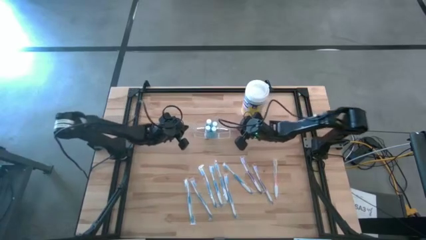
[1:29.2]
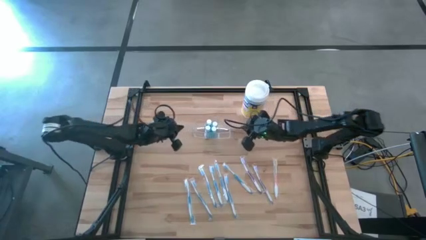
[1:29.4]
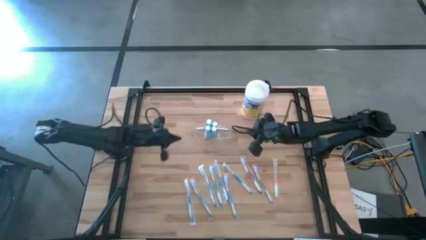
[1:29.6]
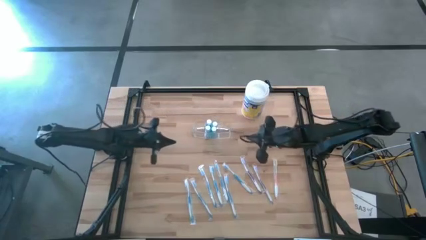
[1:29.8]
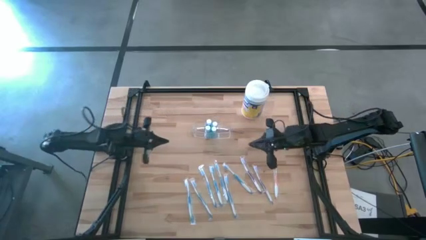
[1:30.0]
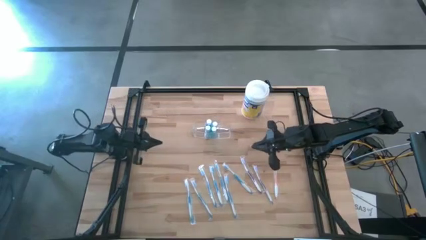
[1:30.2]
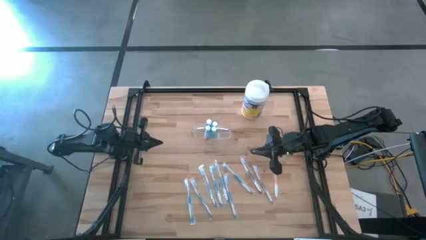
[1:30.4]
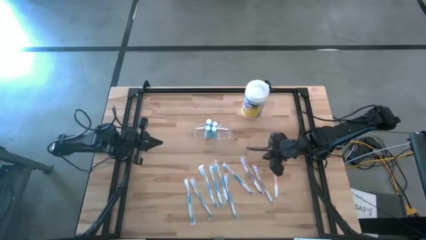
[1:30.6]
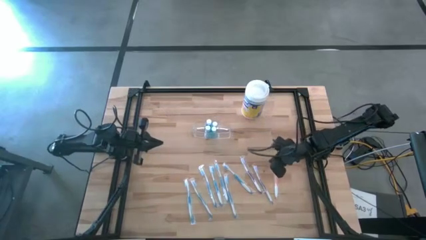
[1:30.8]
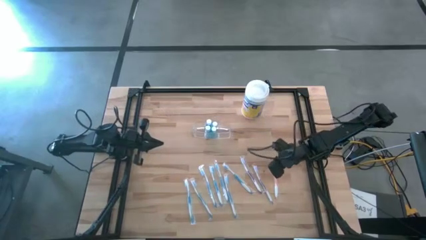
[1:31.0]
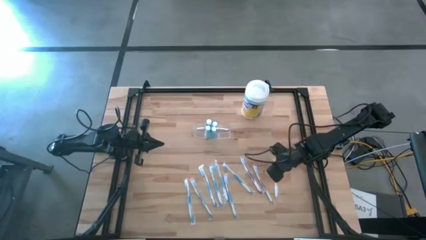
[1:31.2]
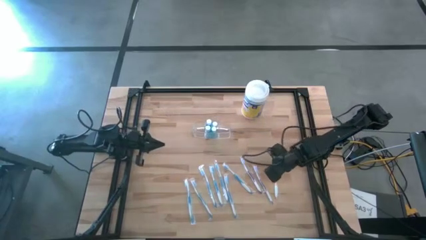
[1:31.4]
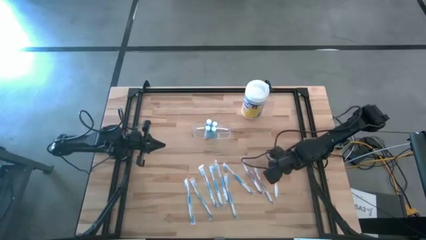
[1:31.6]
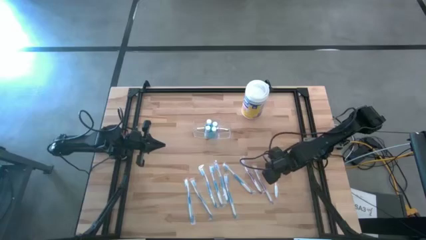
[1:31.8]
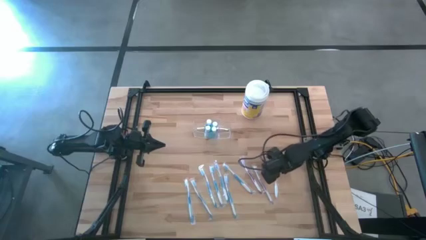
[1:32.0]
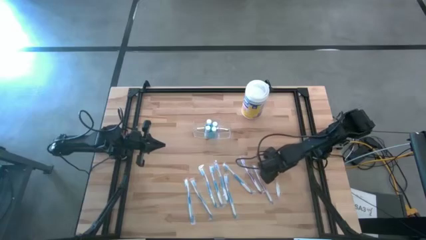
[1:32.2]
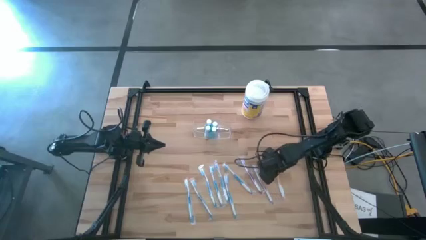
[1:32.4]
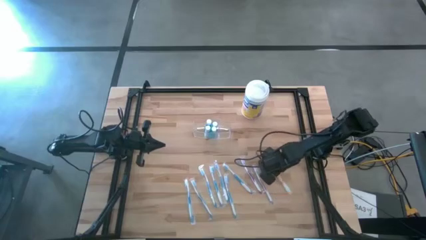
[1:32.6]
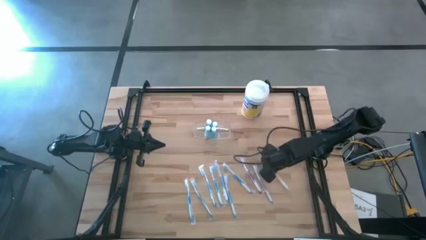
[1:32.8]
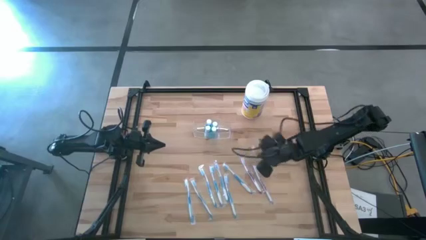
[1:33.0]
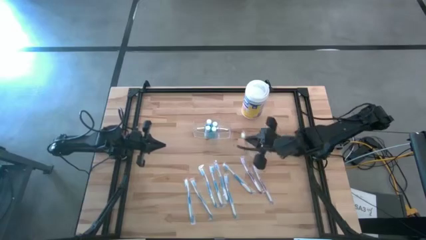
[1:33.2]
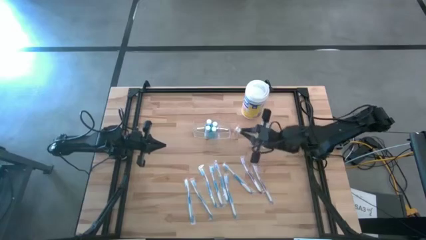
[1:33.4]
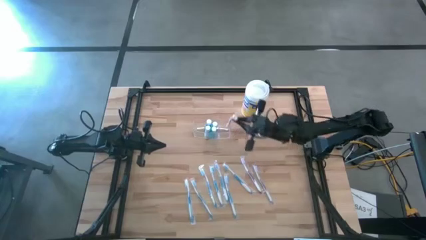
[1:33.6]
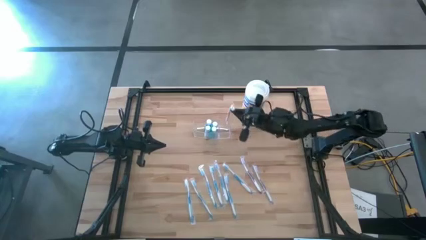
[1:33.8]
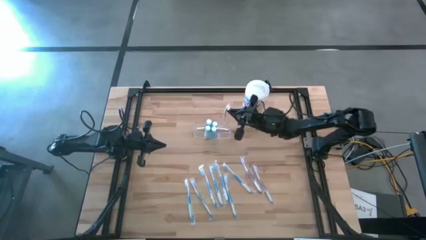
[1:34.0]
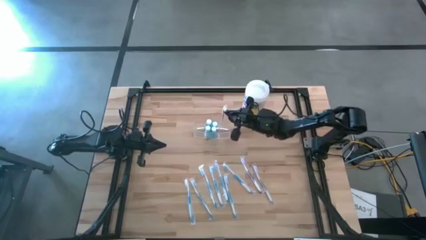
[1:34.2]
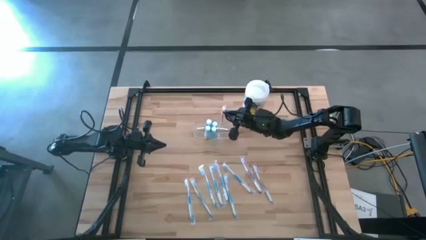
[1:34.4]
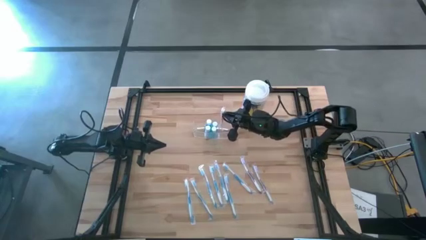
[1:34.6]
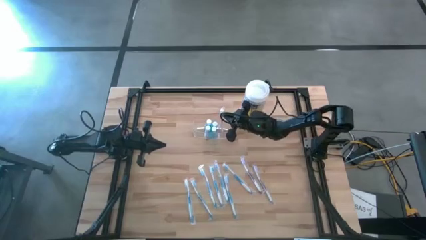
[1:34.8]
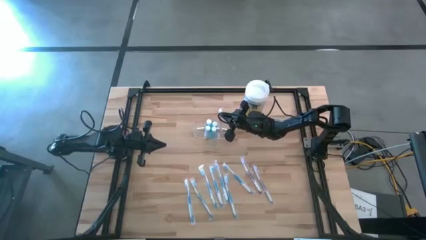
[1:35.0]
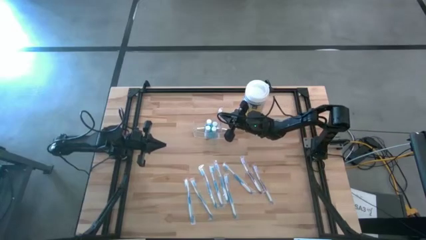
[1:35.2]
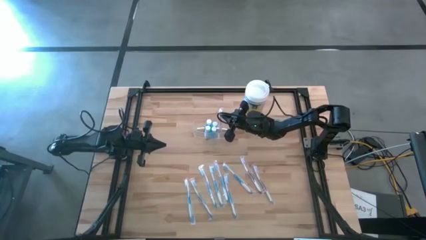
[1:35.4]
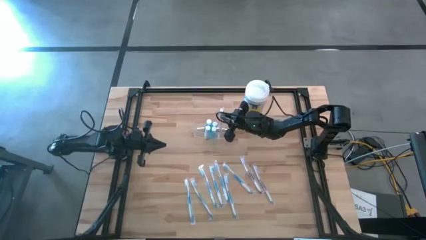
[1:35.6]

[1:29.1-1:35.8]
Task: Pick & Place toothbrushing station
Put the orange toothbrush into the transparent organizer

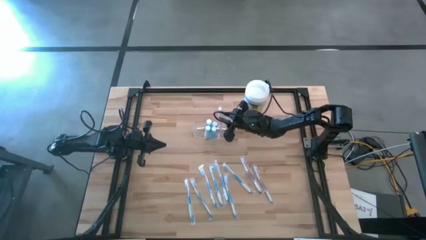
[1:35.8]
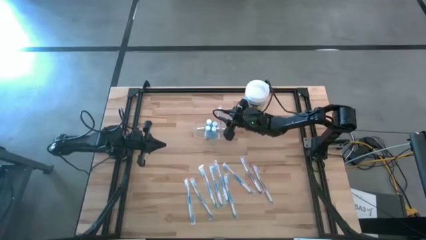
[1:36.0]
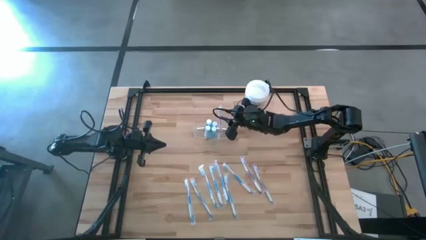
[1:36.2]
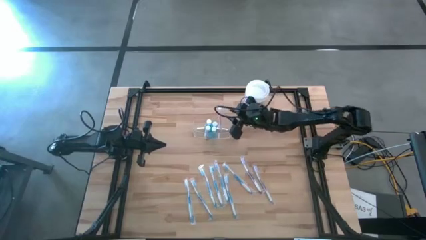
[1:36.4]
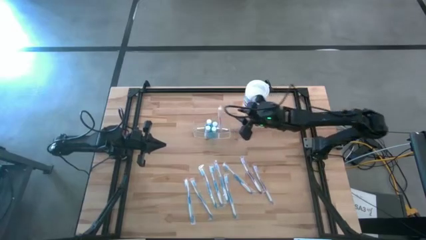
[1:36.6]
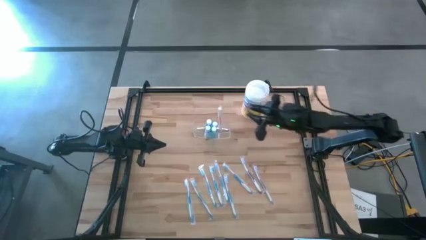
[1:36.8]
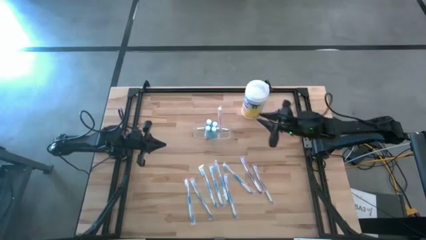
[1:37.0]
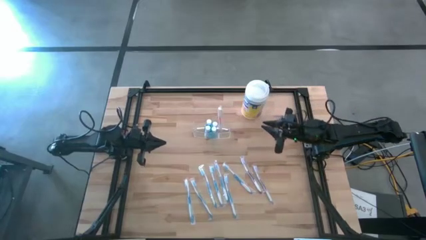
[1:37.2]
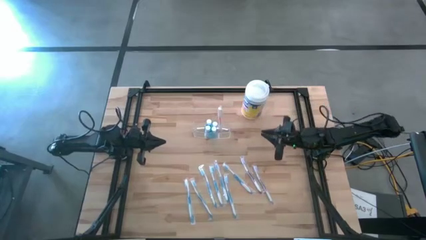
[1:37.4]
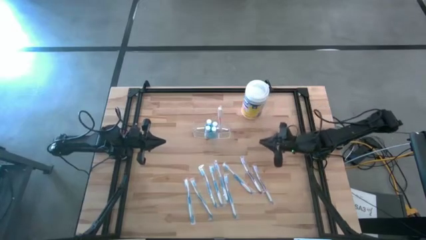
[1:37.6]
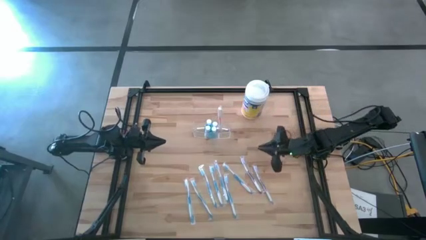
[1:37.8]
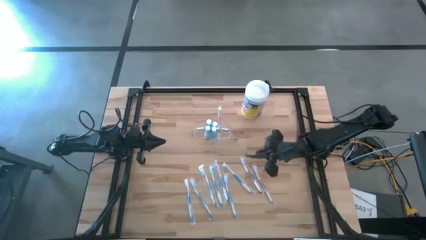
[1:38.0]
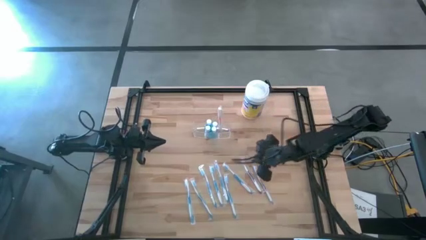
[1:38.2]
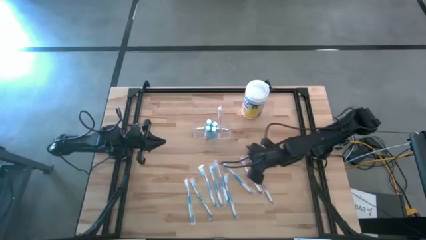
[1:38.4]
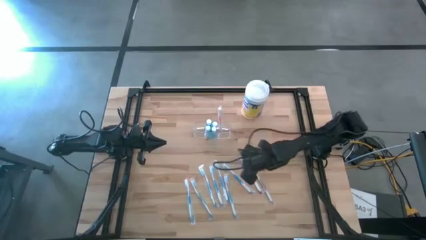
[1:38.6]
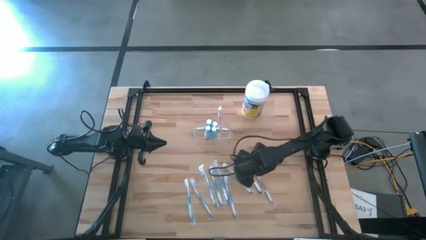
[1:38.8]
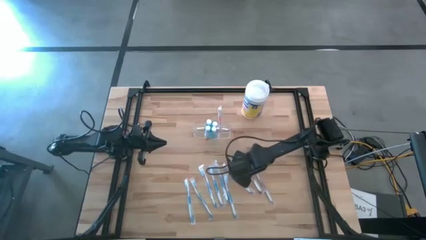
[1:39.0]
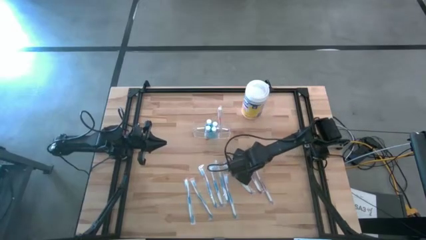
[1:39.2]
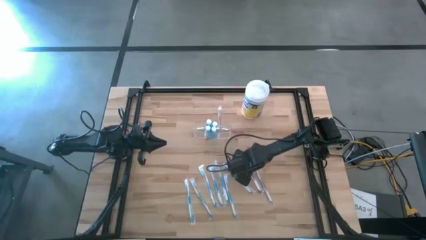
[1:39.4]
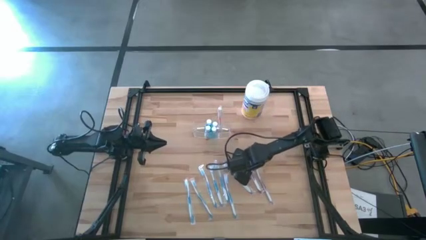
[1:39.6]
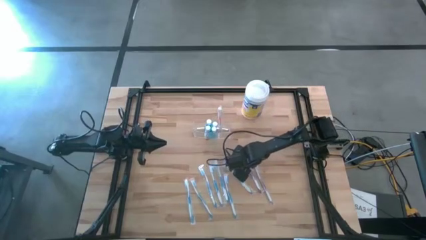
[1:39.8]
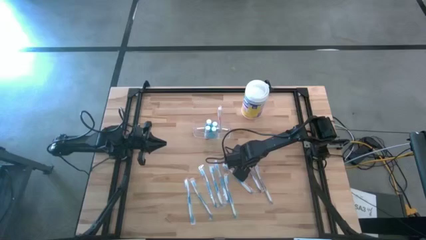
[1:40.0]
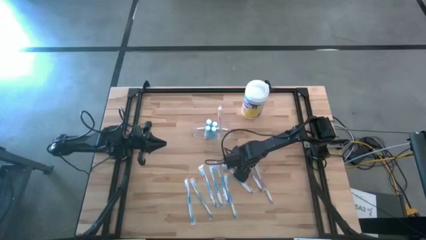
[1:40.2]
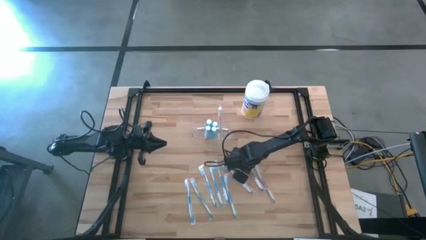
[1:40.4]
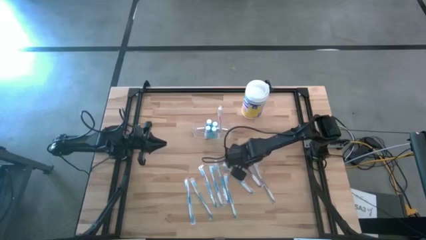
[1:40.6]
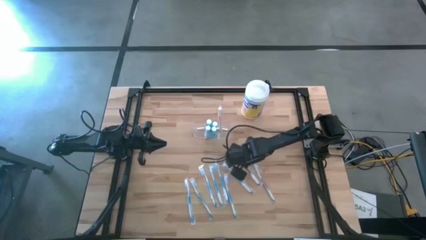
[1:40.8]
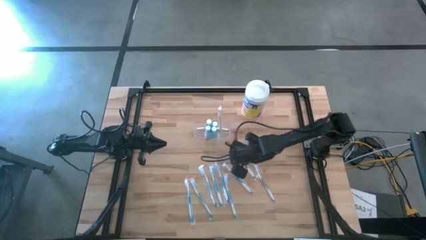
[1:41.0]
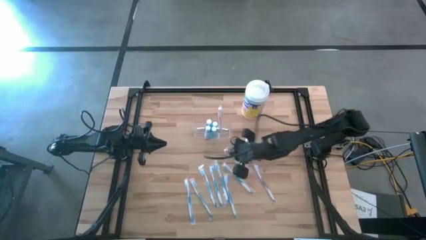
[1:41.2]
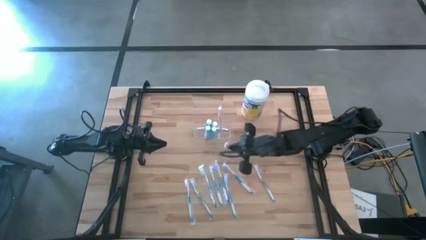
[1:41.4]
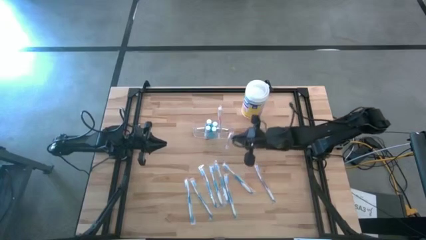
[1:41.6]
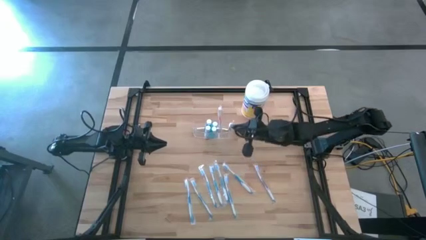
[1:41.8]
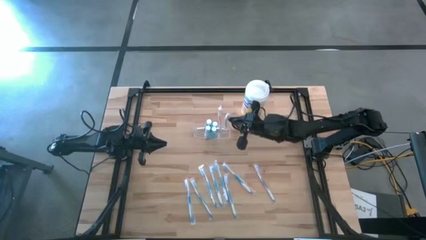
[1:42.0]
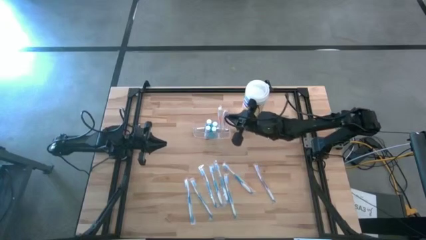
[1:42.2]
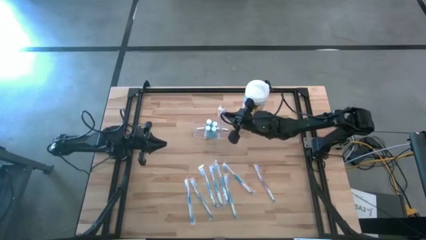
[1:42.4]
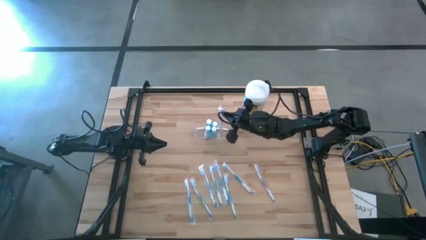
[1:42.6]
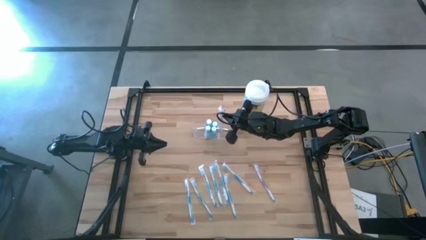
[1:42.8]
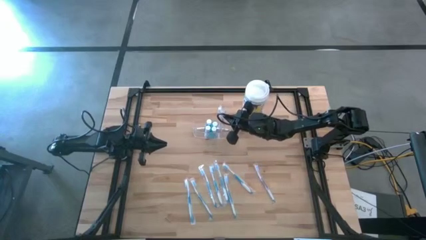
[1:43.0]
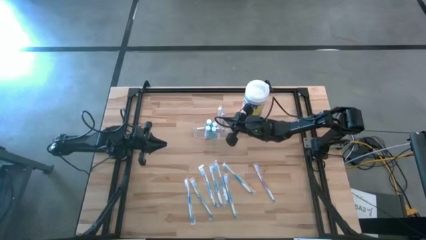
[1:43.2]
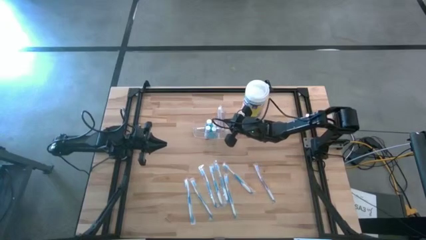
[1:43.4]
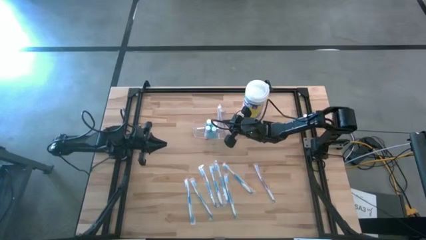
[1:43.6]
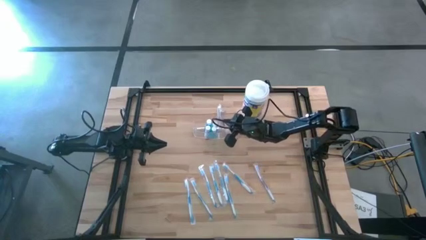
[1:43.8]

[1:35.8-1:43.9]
Put the left purple toothbrush into the transparent organizer
